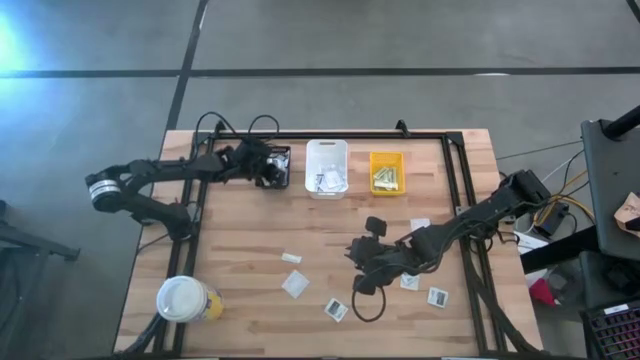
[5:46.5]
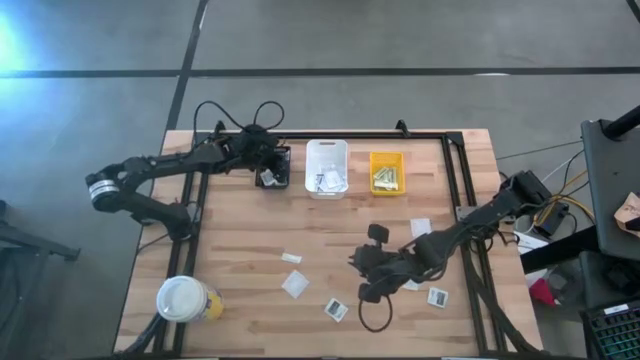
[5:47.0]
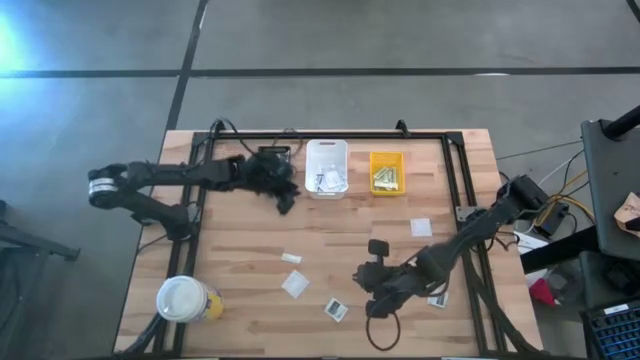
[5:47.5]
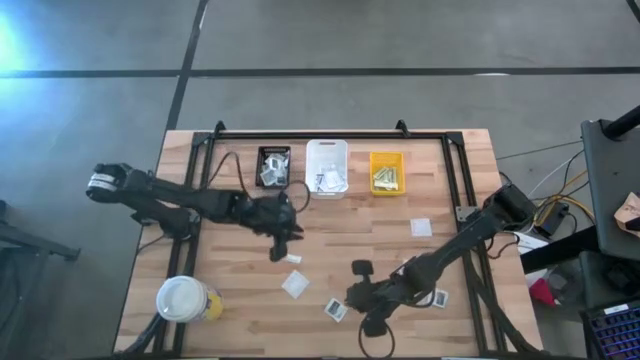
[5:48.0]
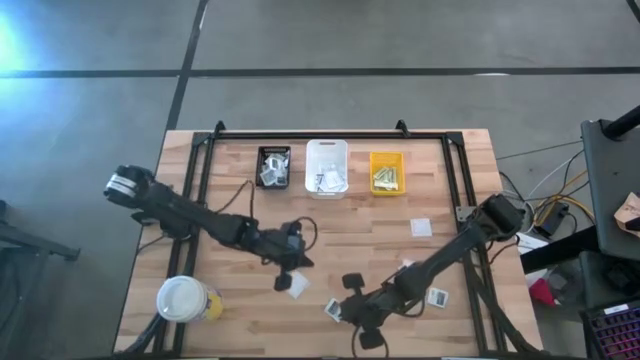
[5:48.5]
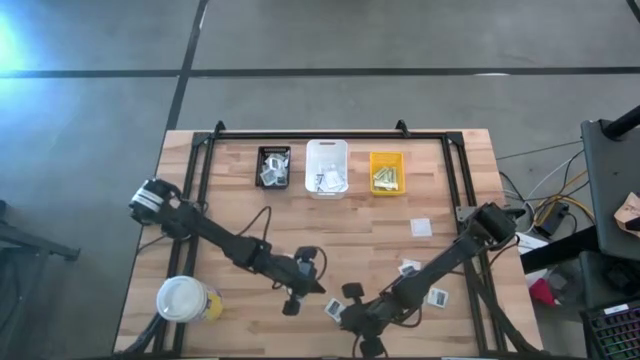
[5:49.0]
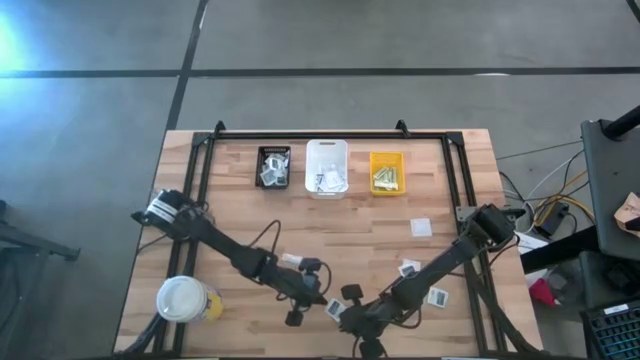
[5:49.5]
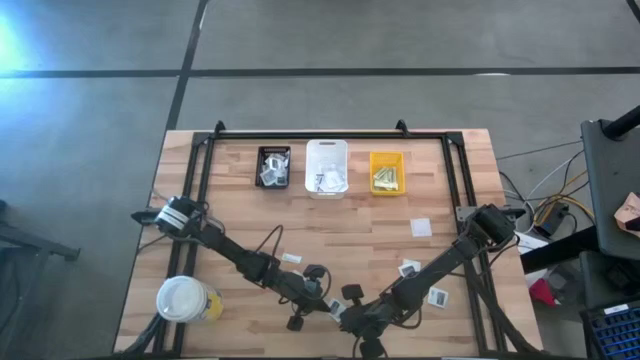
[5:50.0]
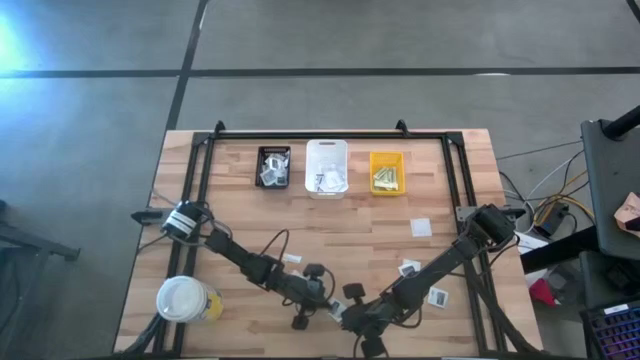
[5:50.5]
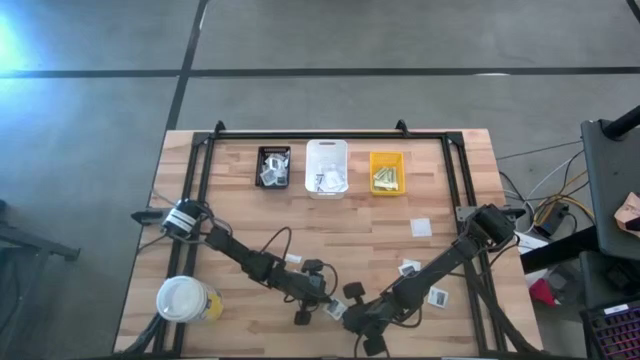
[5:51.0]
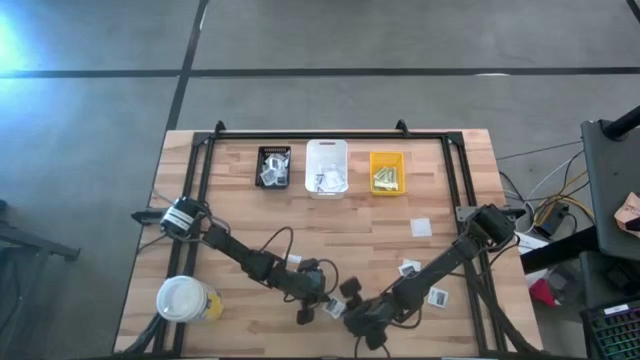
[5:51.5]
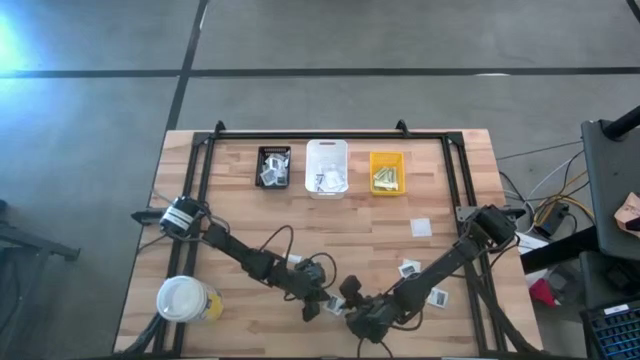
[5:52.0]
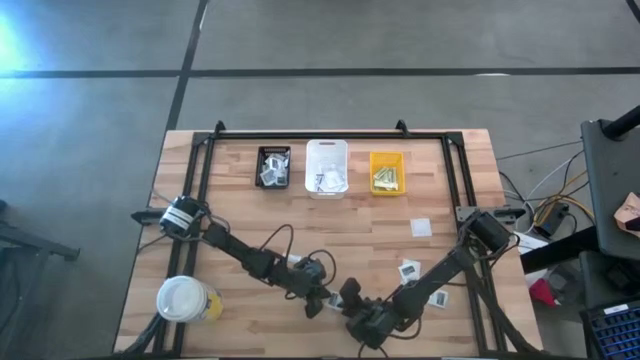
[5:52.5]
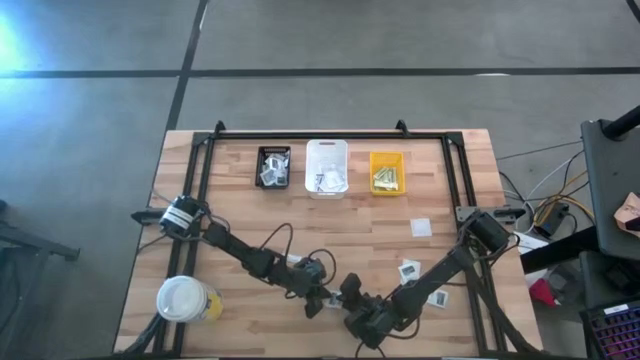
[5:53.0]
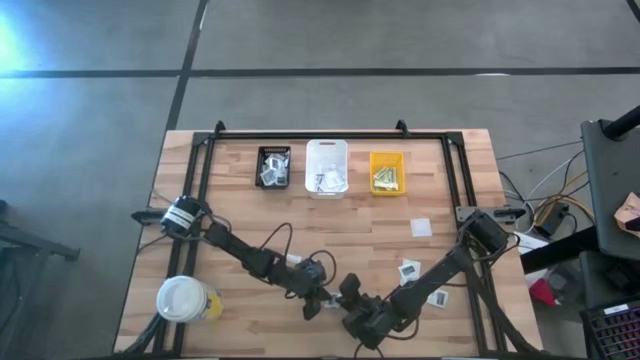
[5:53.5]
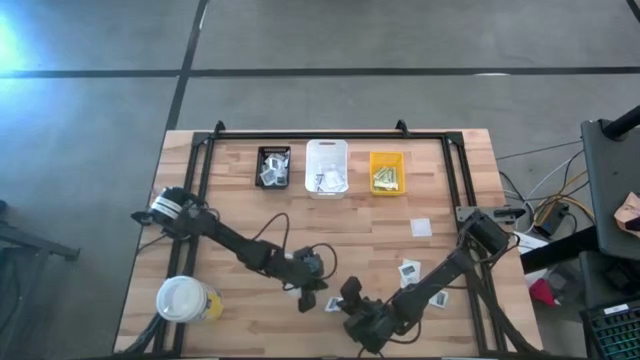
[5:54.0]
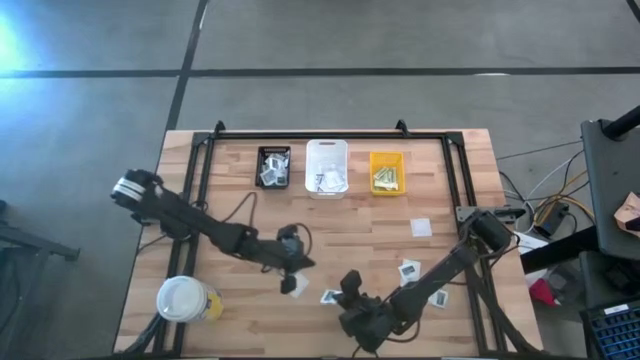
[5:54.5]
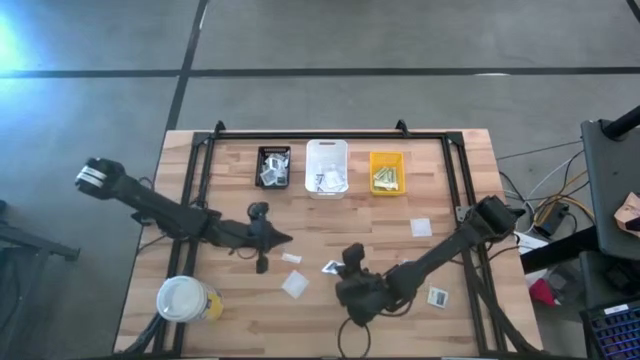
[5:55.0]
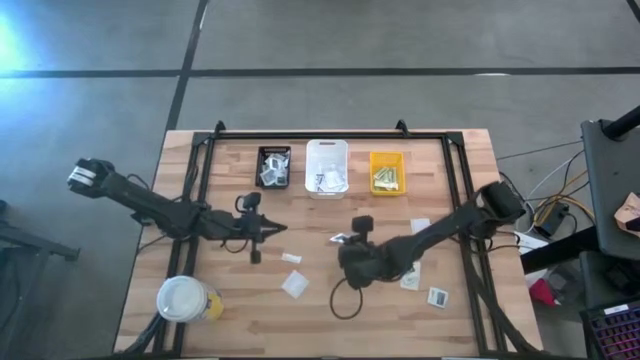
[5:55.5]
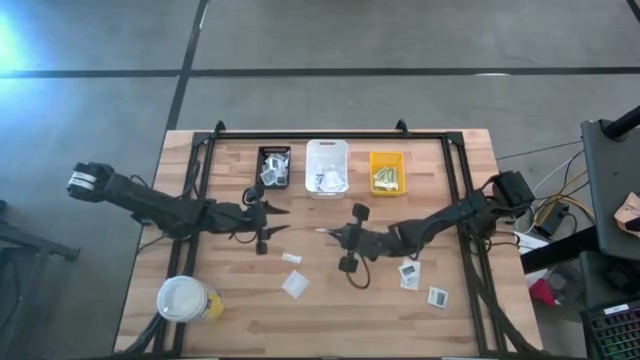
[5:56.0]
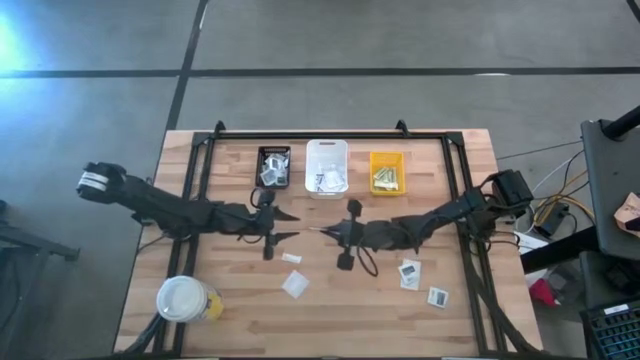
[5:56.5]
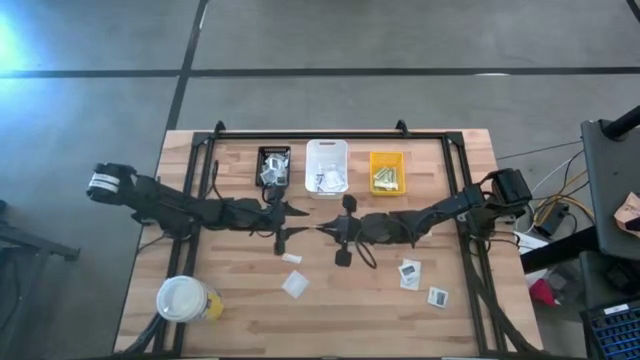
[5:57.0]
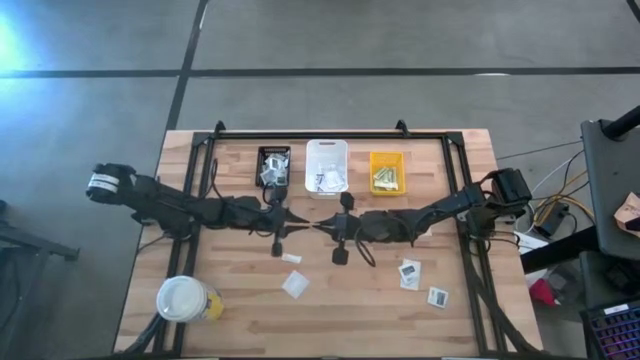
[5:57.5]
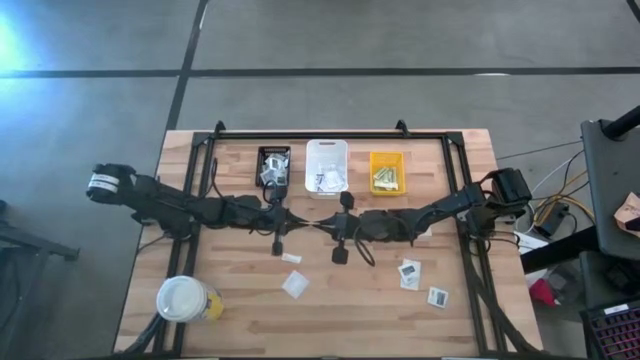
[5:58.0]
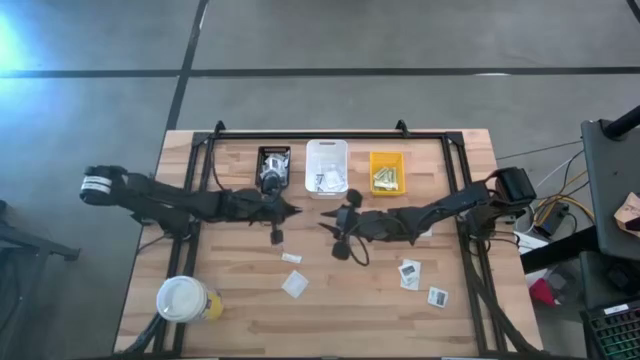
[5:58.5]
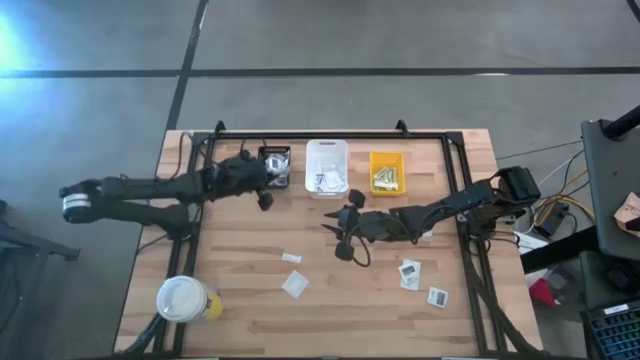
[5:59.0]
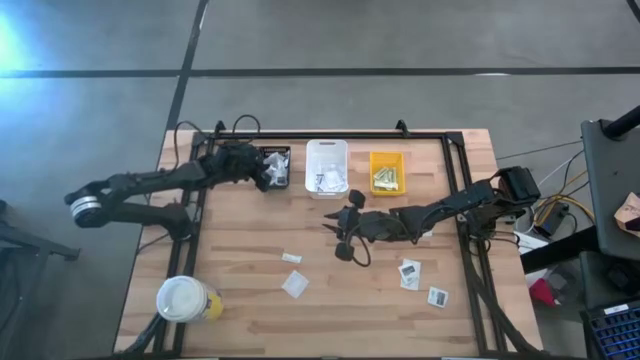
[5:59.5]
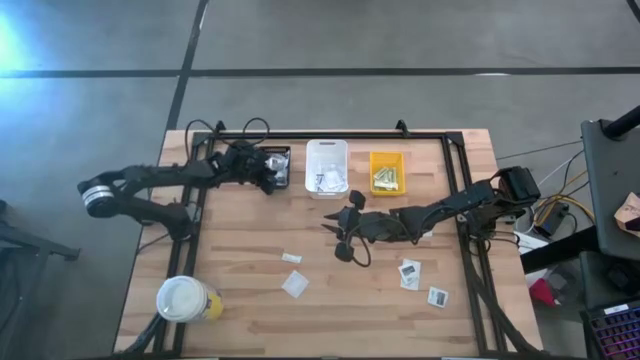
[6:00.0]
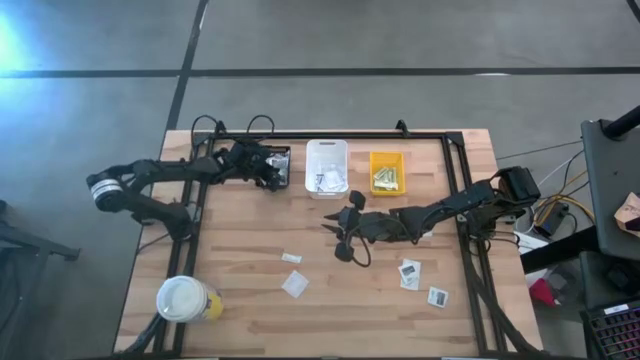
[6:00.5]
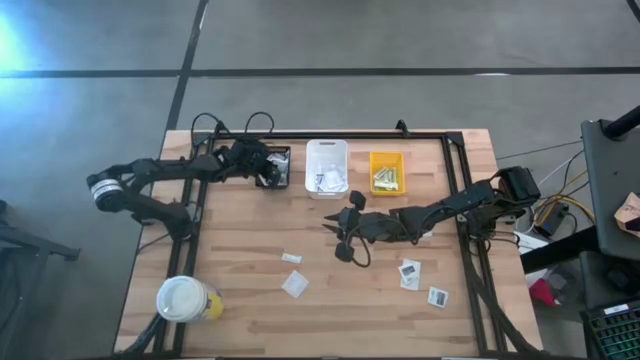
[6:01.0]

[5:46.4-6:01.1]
Task: Pick & Place First Aid Supplies
Put the towelette pack into the black basket

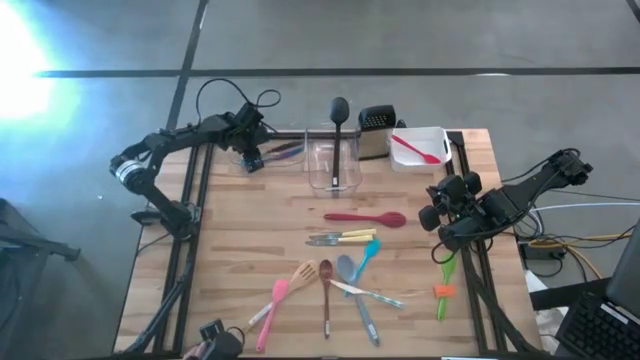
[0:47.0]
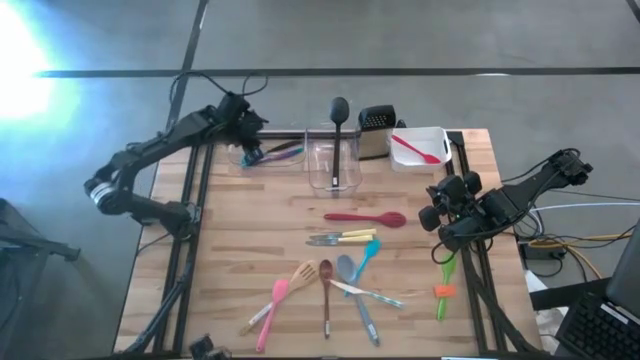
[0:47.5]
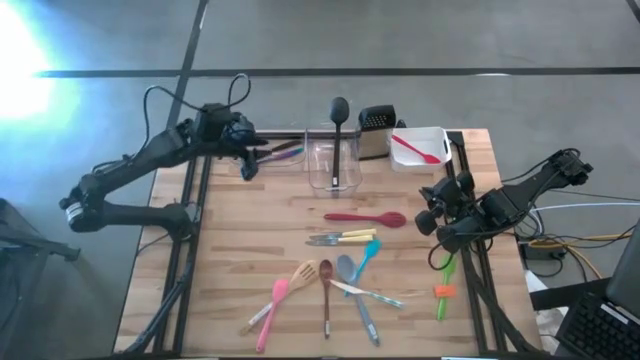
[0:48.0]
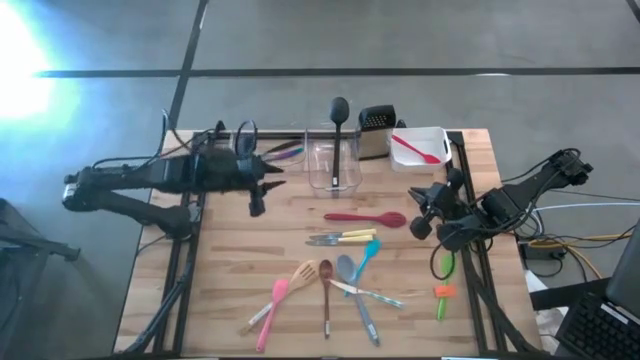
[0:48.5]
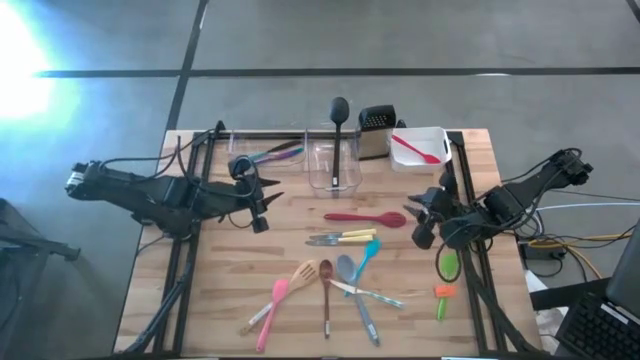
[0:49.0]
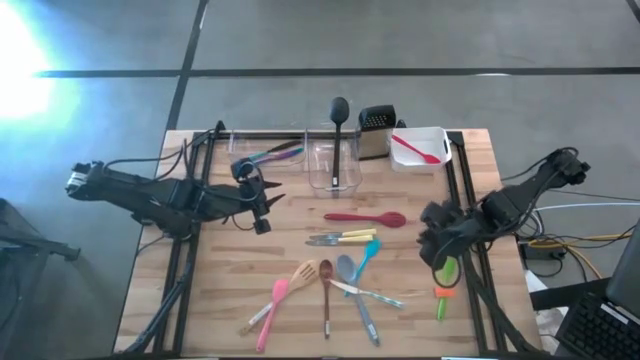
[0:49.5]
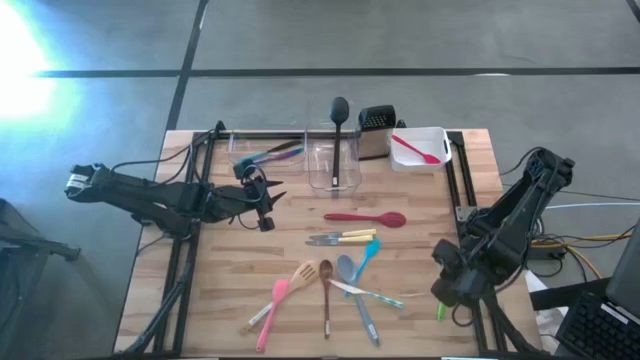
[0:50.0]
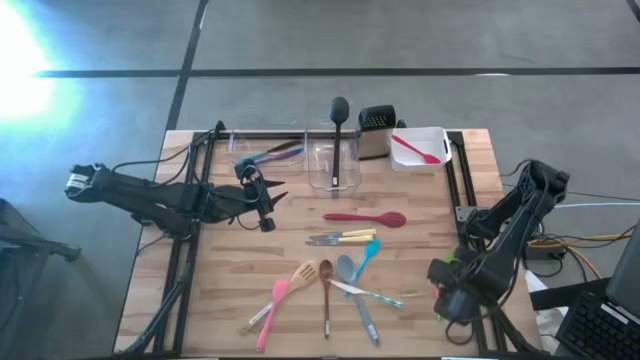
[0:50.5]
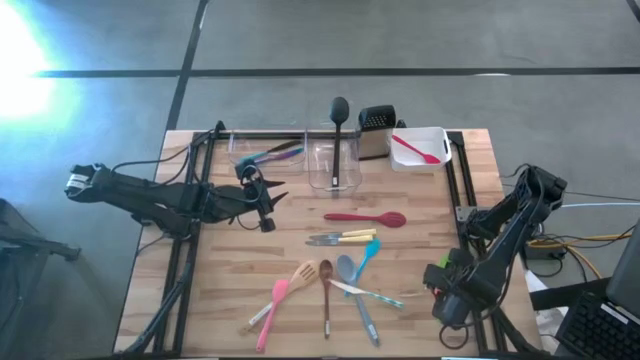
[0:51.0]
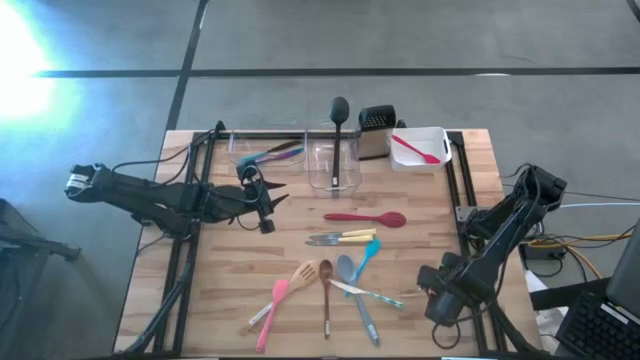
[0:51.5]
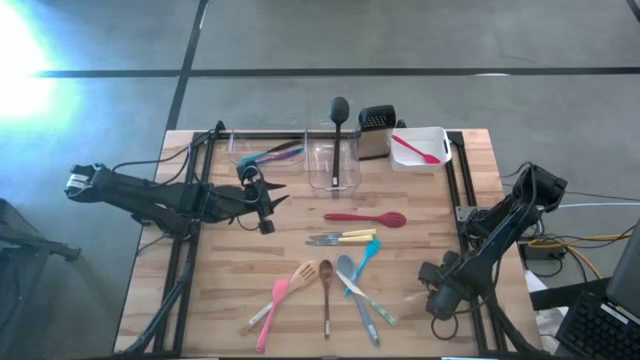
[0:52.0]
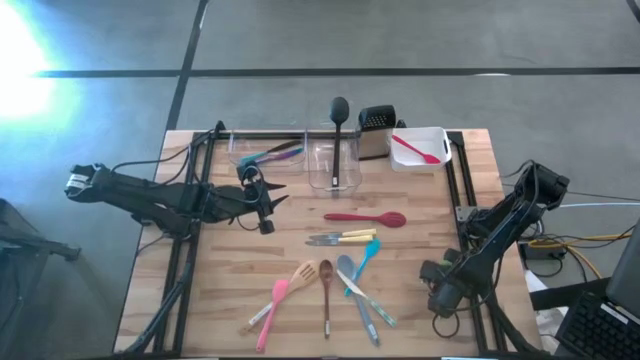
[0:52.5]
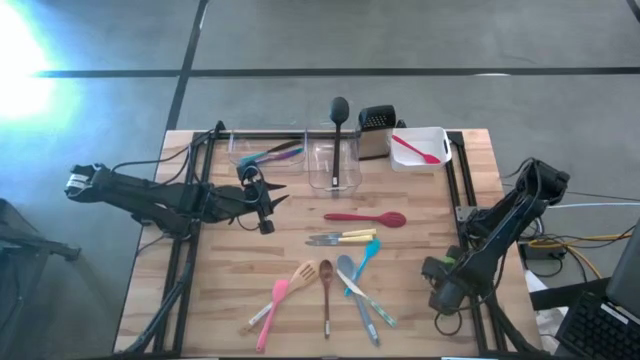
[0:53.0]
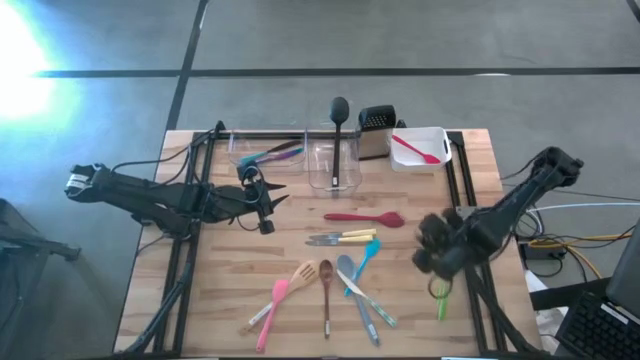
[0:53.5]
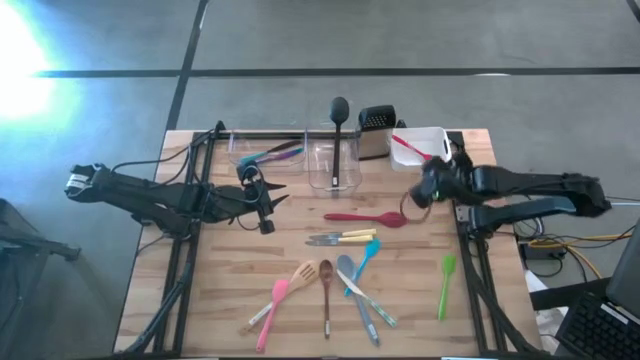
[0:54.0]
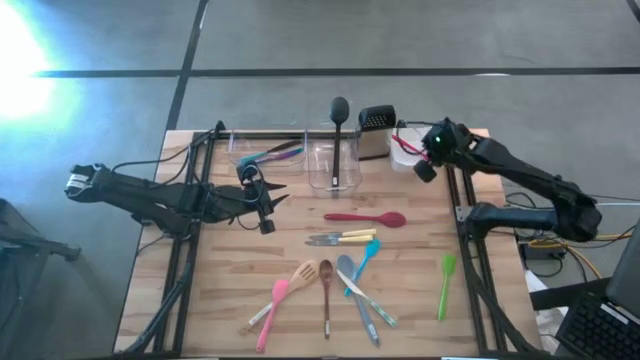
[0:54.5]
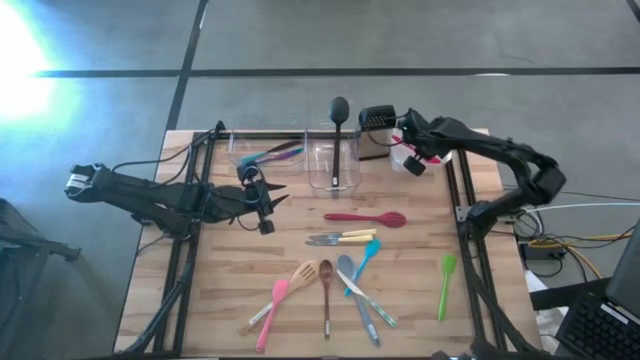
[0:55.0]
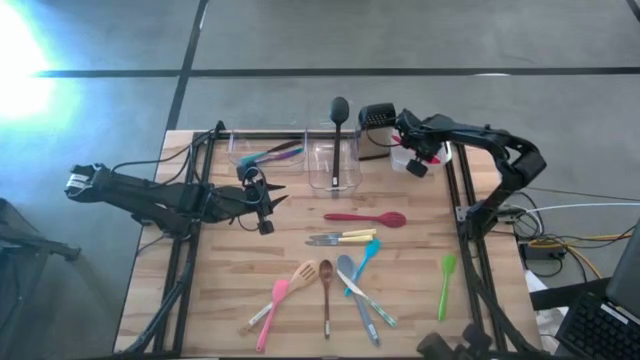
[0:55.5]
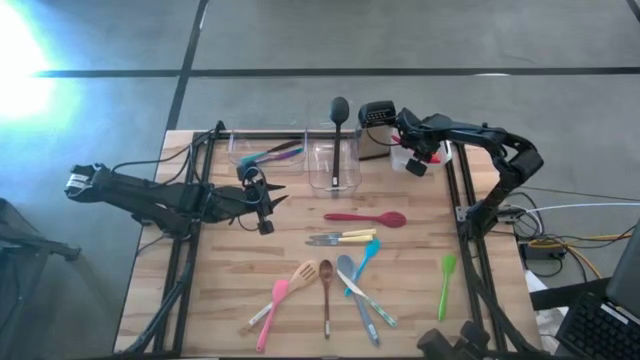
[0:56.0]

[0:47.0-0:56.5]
Task: Pick & Place Kitchen Items
Put the orange spatula into white bin
